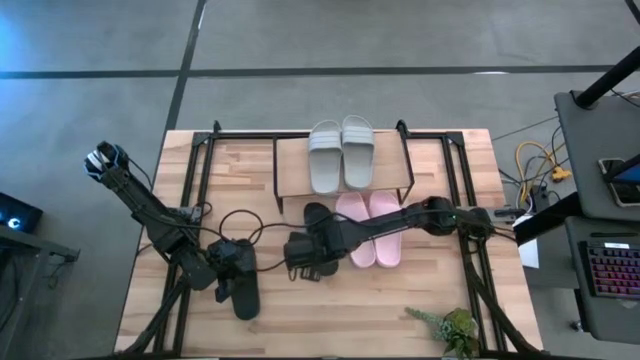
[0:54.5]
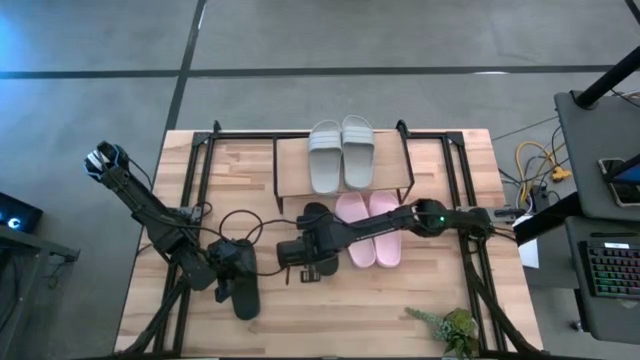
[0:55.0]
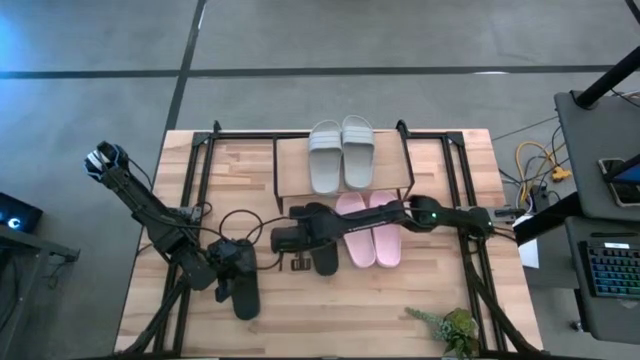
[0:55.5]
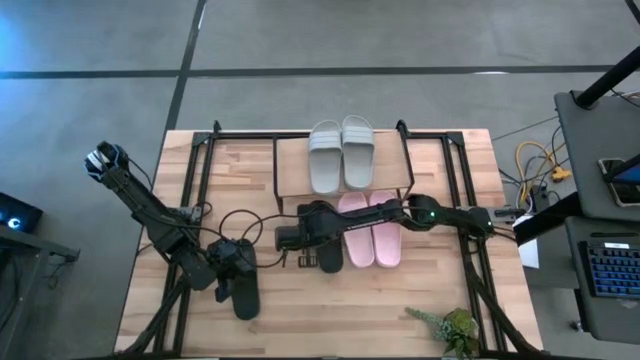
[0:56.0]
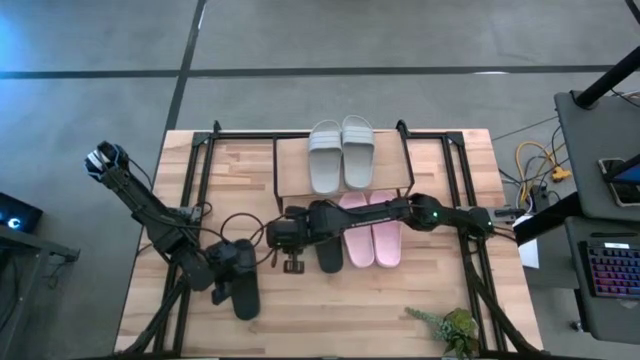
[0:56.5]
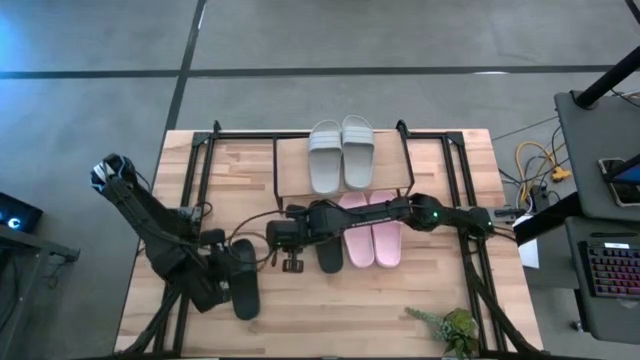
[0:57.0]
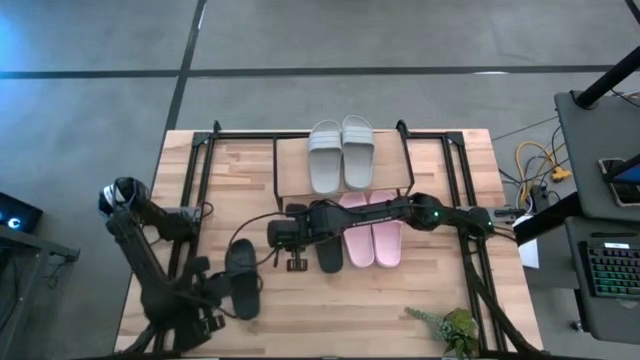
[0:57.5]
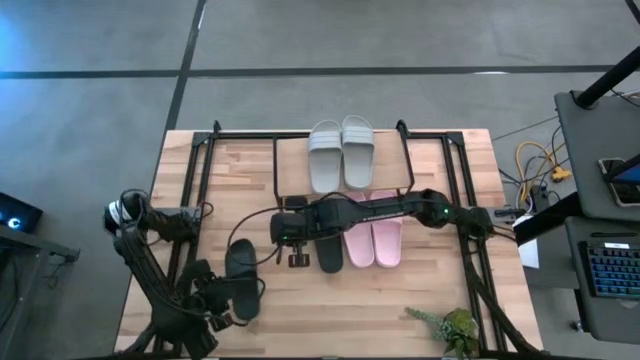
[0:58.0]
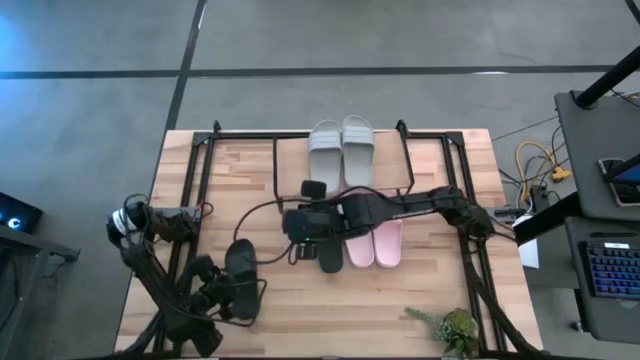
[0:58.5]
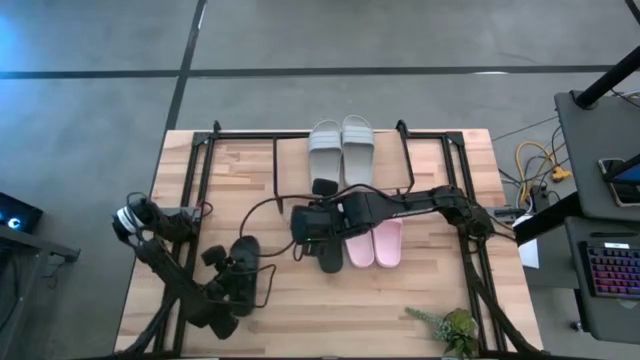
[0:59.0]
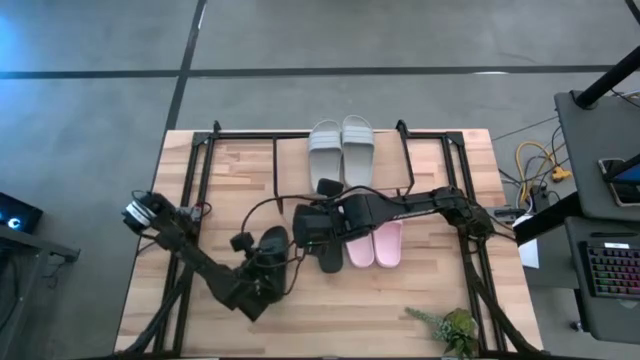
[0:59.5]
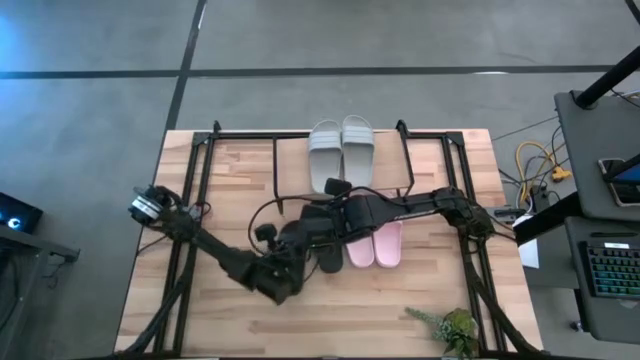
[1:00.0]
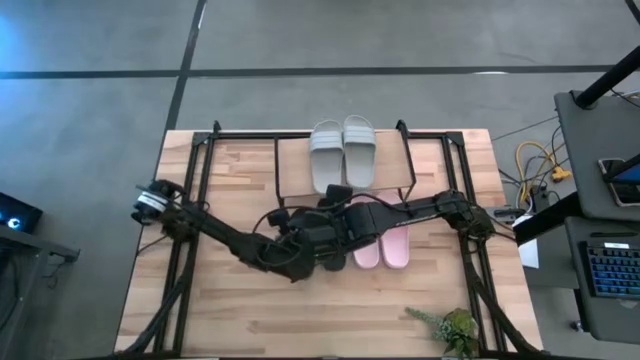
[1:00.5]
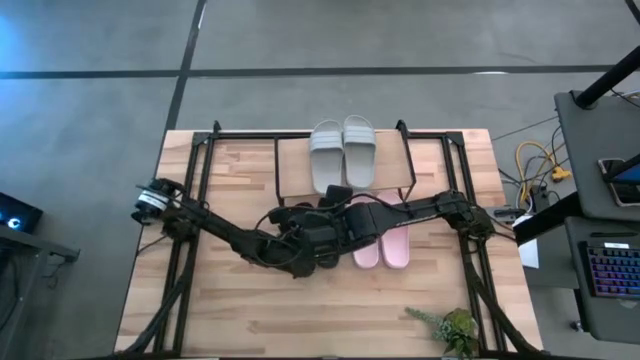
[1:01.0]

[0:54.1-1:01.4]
Task: Pick and place slides into the shelf
Put the black slide under the shelf

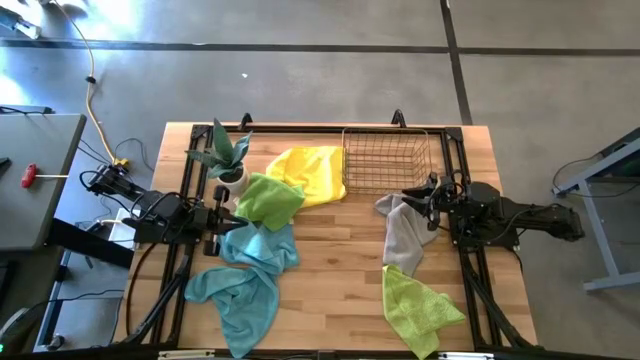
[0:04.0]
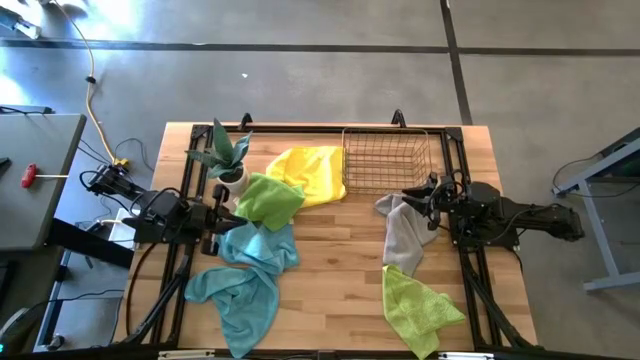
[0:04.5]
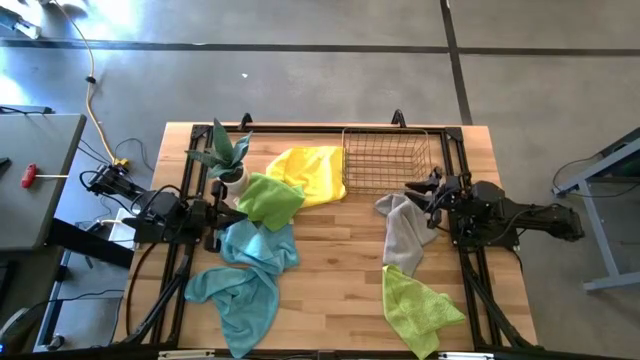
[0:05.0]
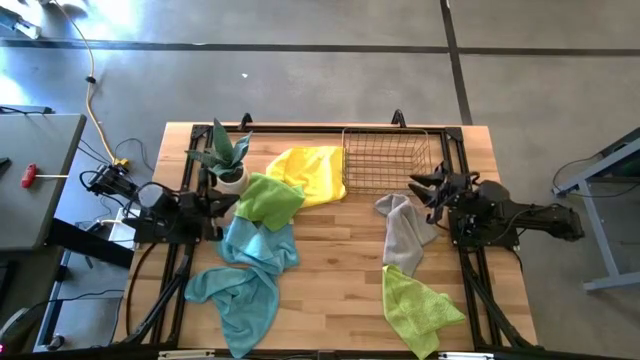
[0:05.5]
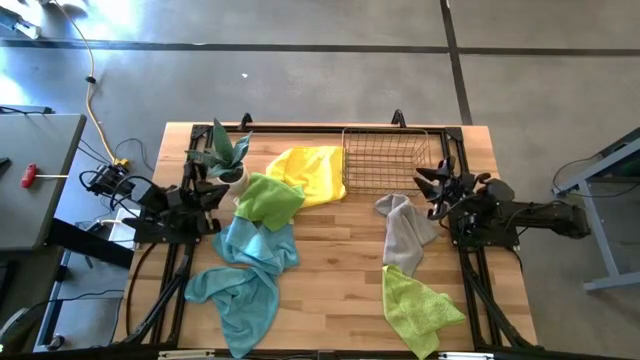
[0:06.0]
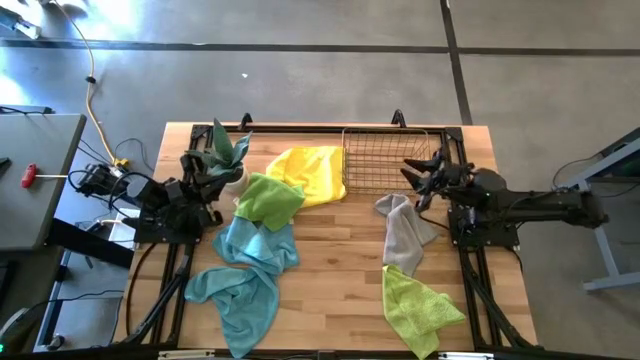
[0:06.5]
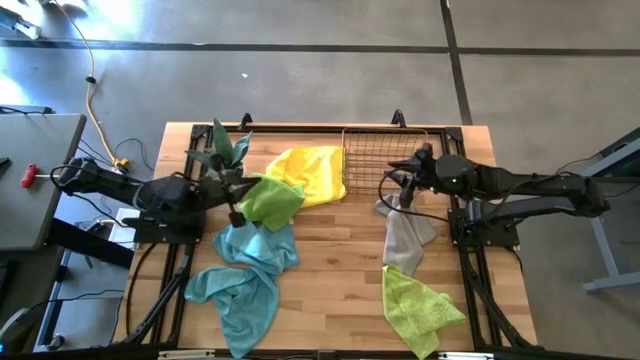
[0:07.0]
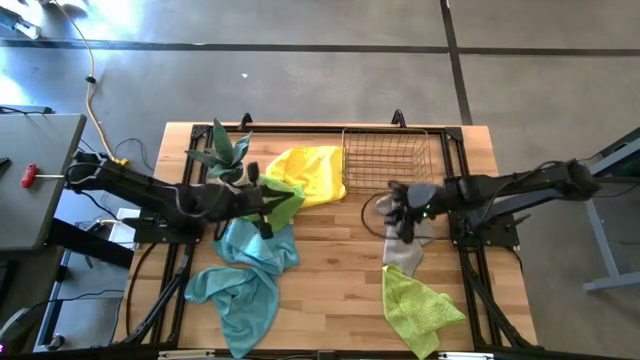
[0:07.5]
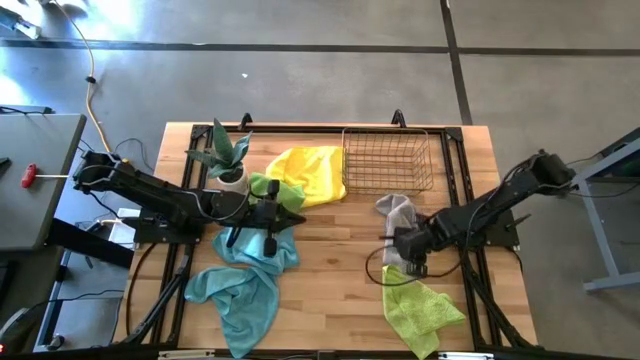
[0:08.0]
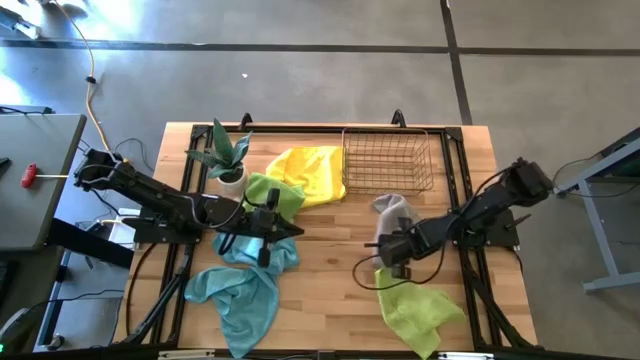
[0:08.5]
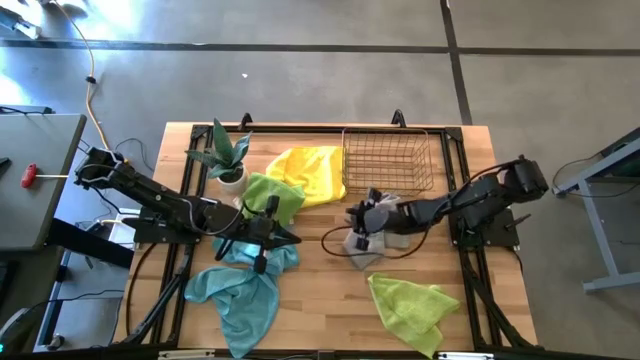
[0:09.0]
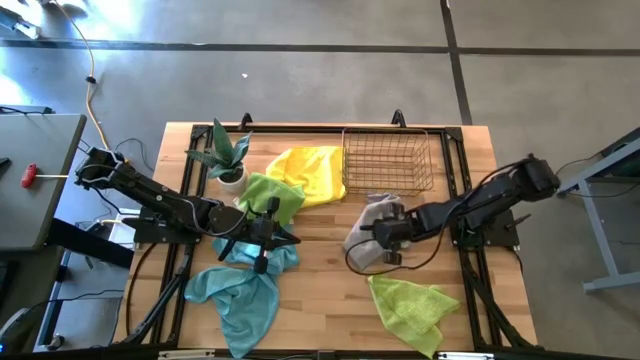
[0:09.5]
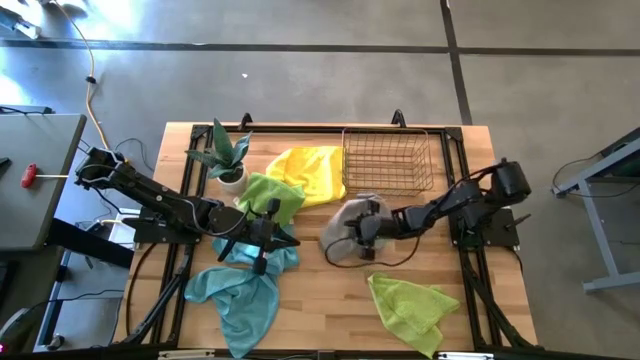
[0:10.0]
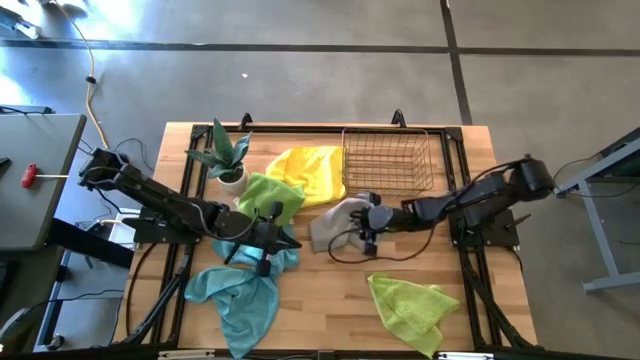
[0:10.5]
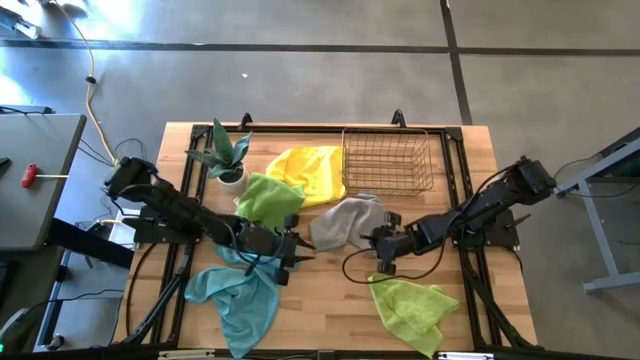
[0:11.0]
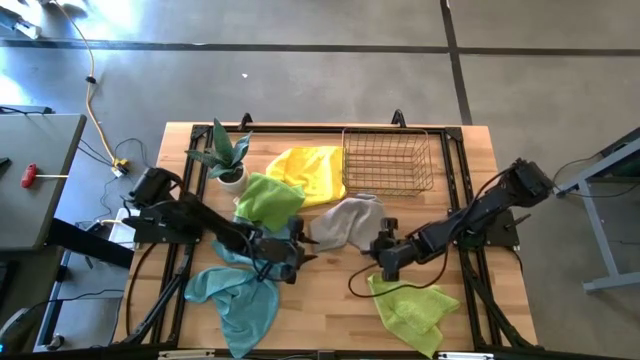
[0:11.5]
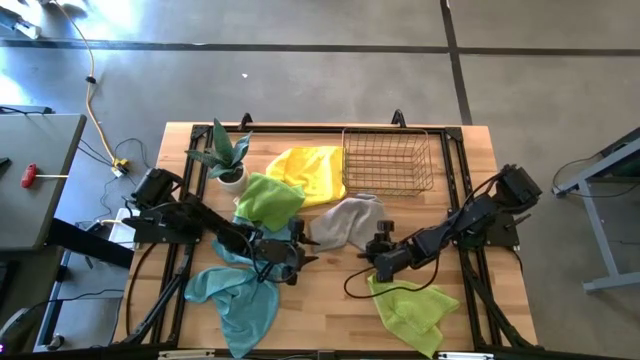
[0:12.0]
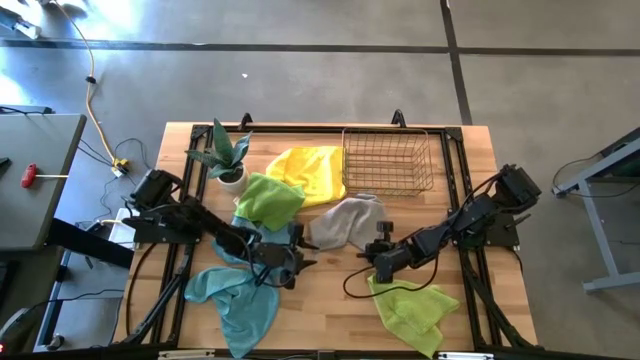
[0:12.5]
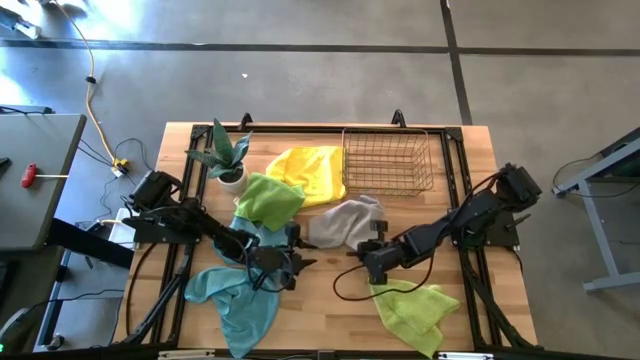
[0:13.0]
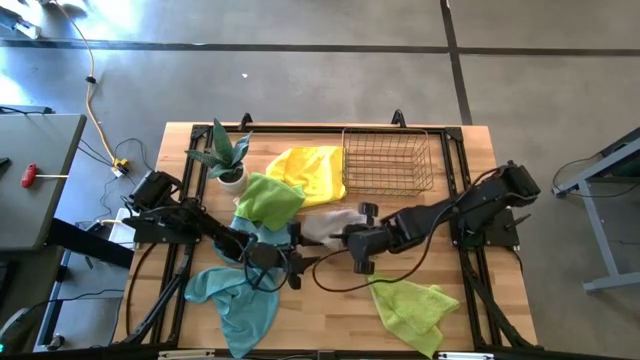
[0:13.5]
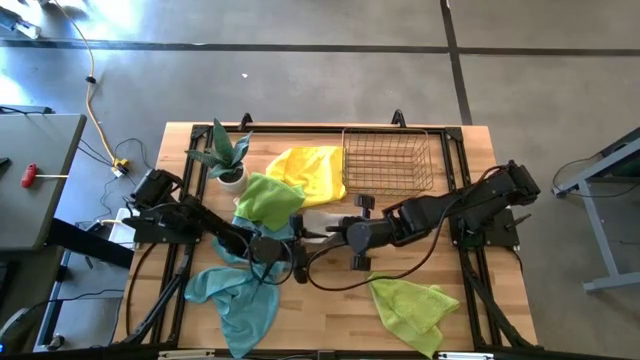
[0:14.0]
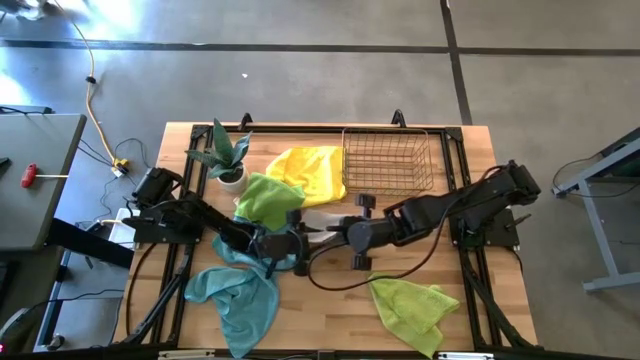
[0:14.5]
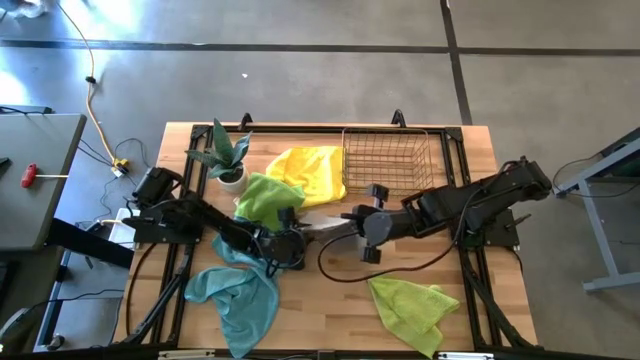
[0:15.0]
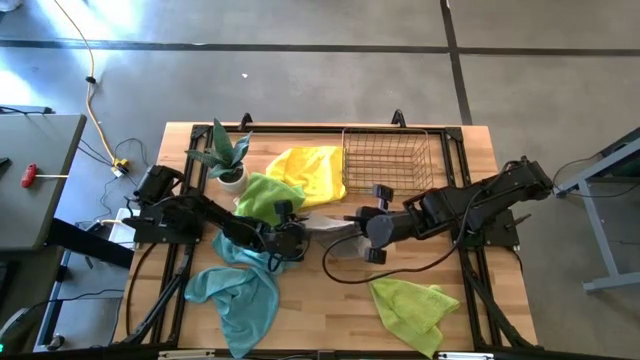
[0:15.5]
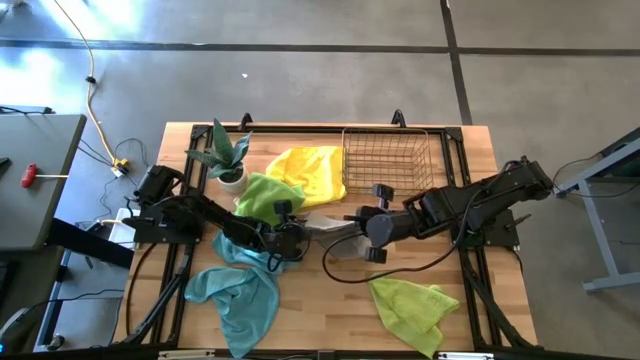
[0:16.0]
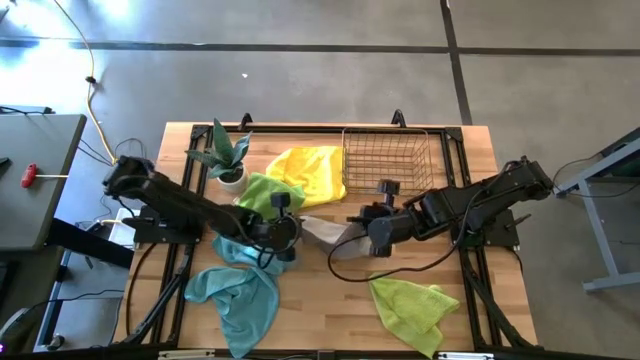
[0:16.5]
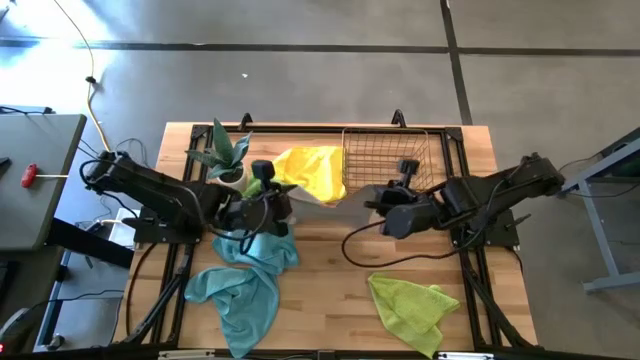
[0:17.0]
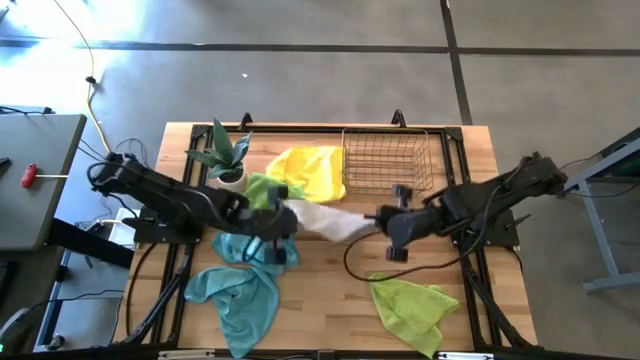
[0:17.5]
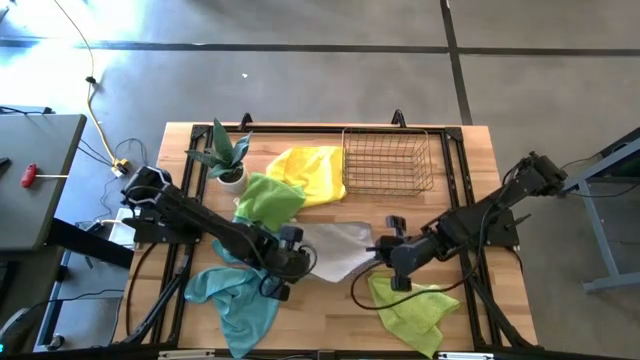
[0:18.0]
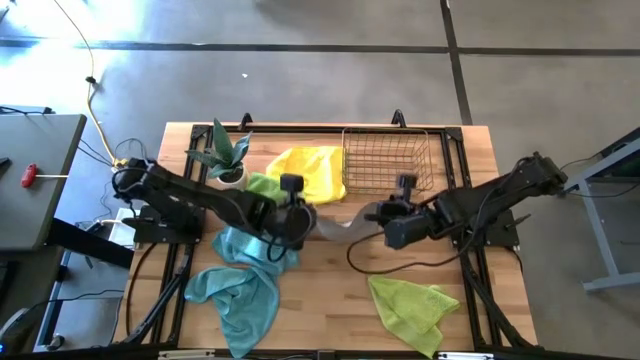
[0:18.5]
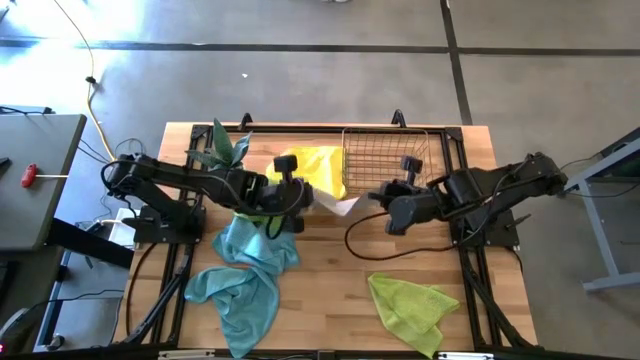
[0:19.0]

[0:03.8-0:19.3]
Task: Fold microfiber towels
Fold the gray microfiber towel
